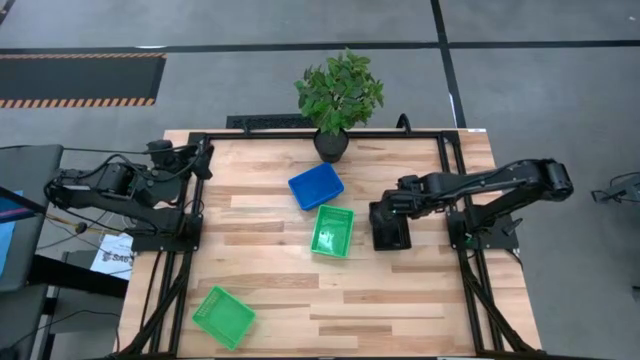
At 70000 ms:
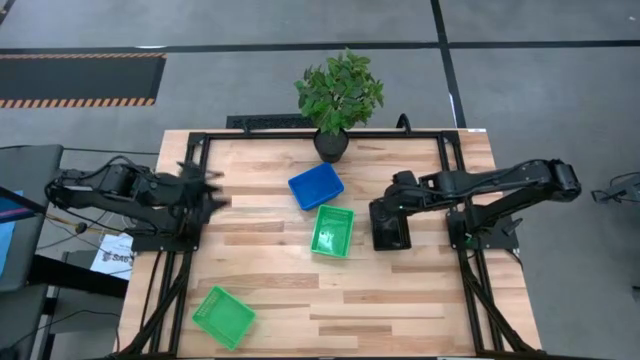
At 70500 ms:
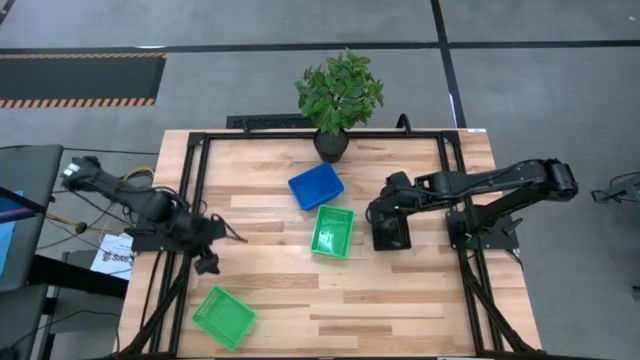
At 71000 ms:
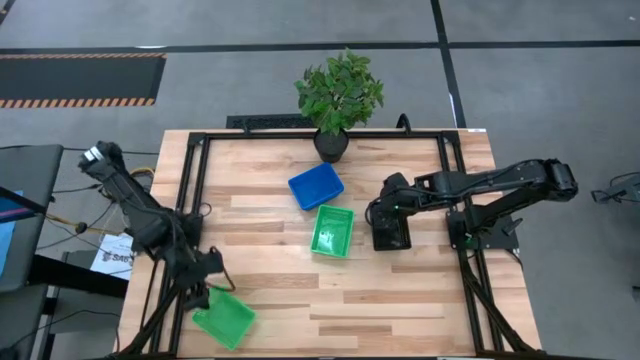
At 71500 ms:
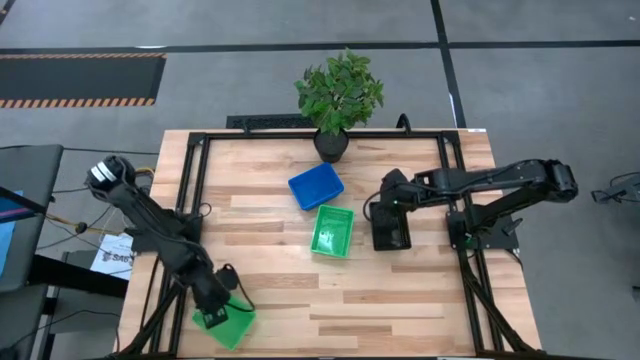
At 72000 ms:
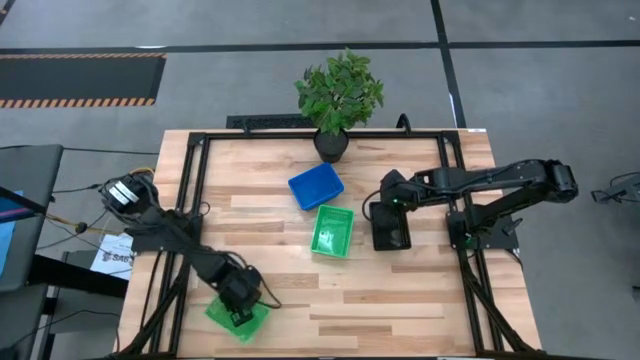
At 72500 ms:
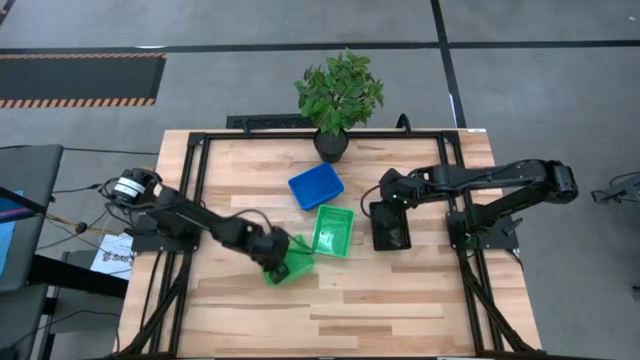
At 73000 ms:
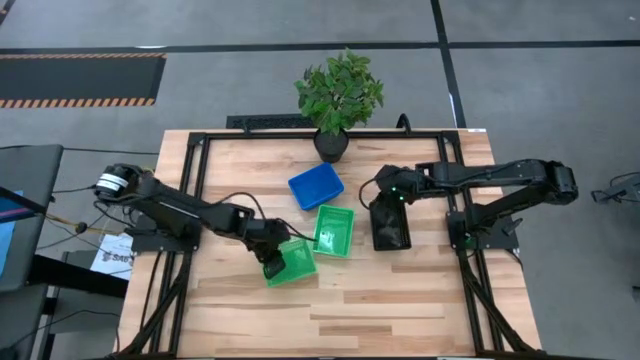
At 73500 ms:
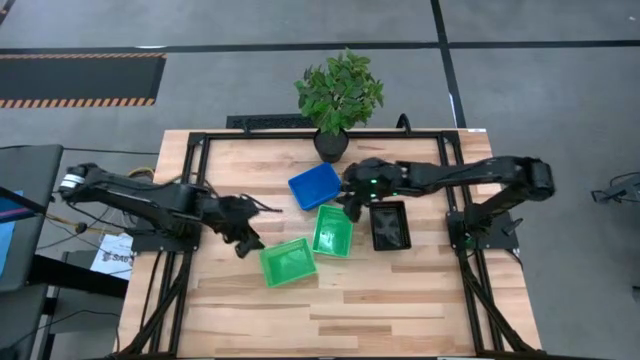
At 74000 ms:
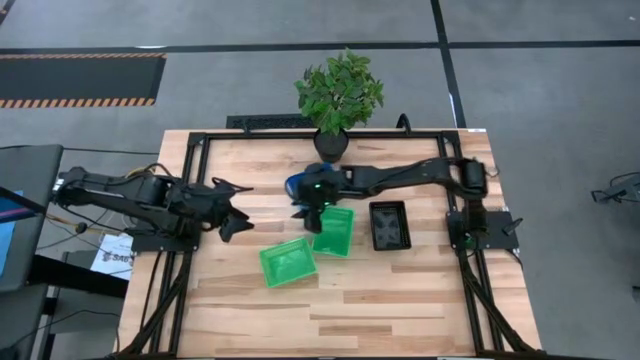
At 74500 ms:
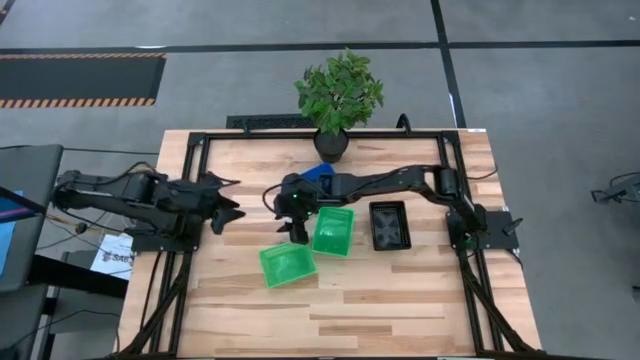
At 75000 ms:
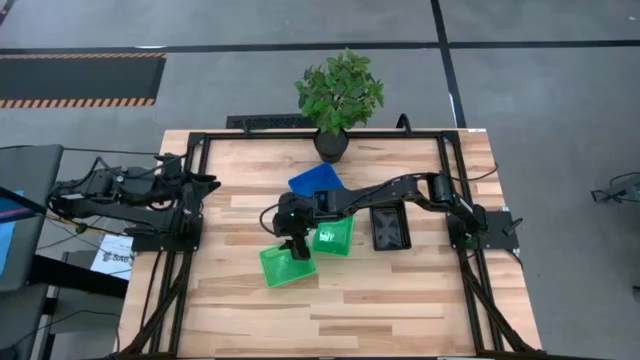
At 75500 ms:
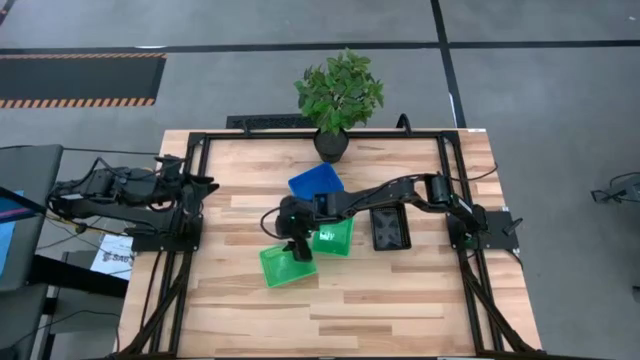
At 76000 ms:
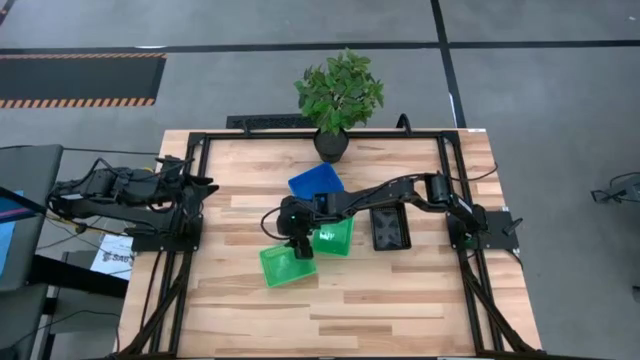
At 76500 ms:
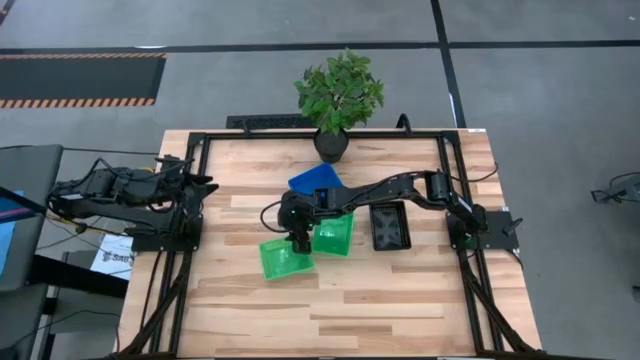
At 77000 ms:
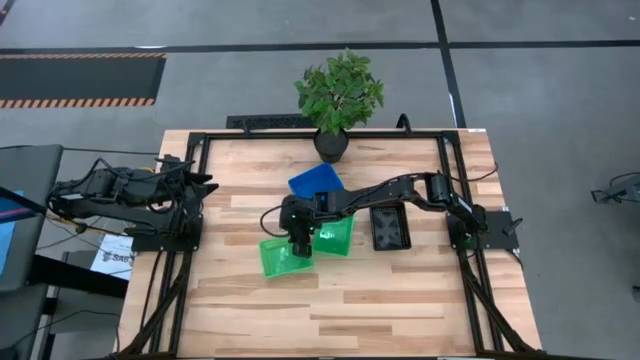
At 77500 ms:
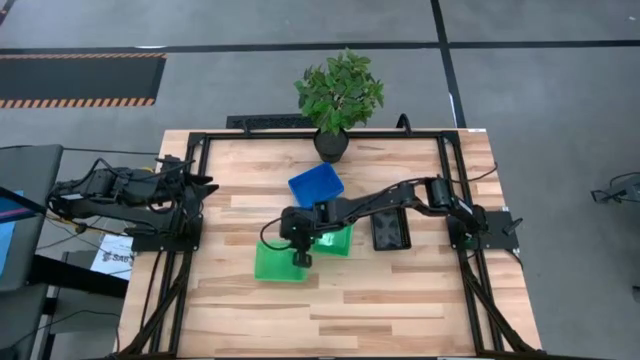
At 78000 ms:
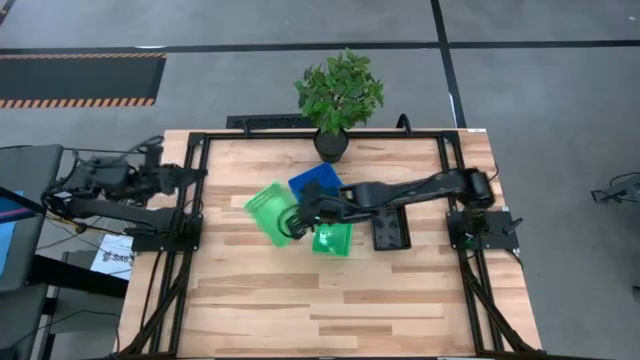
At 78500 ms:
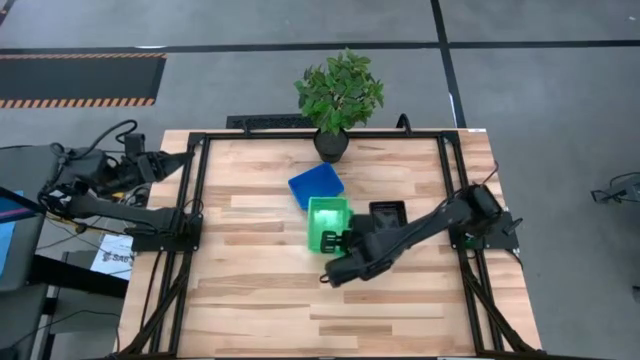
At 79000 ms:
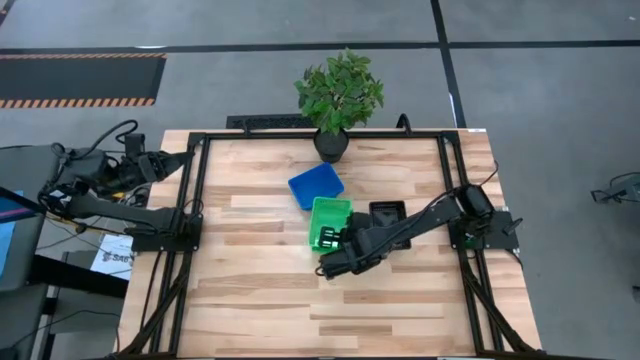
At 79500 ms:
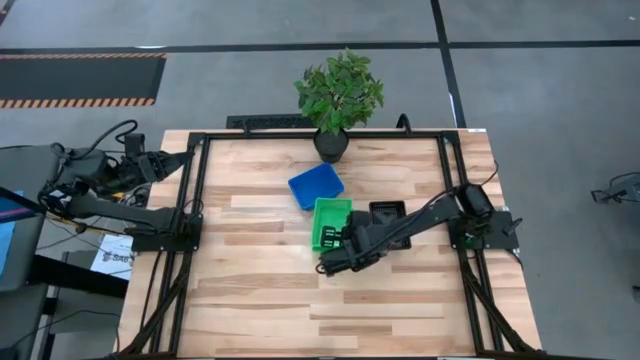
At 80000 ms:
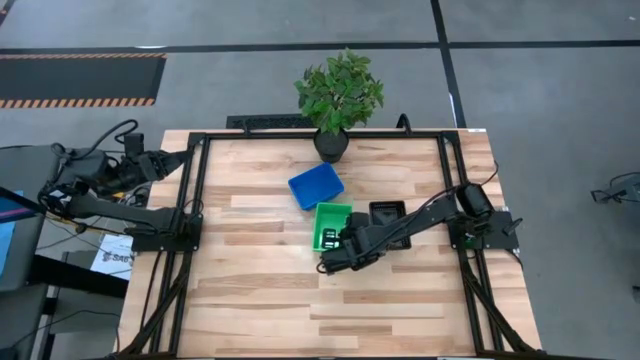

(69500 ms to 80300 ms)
Stack the bottom green bin on the top green bins

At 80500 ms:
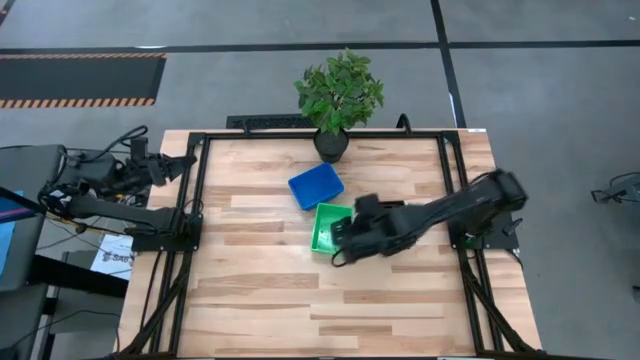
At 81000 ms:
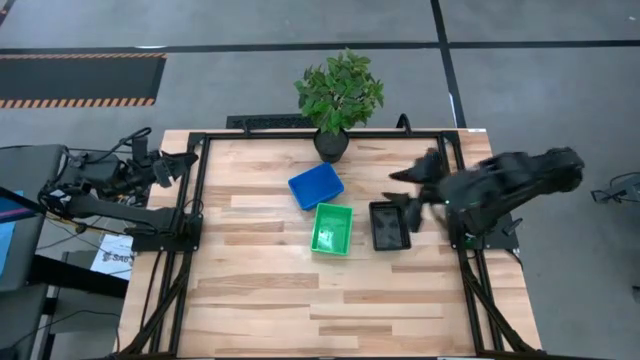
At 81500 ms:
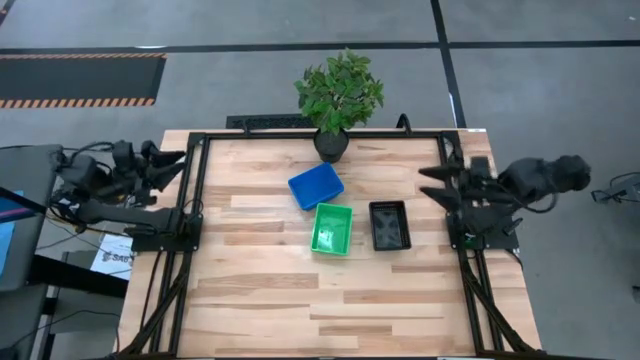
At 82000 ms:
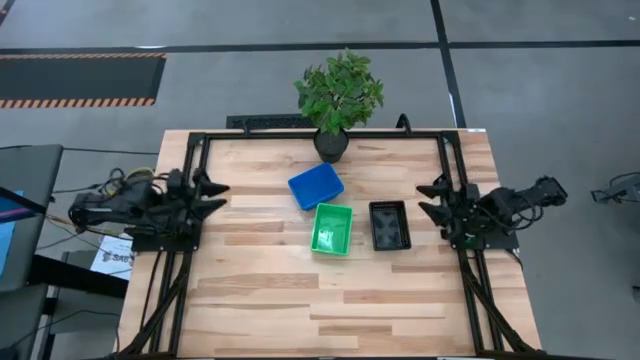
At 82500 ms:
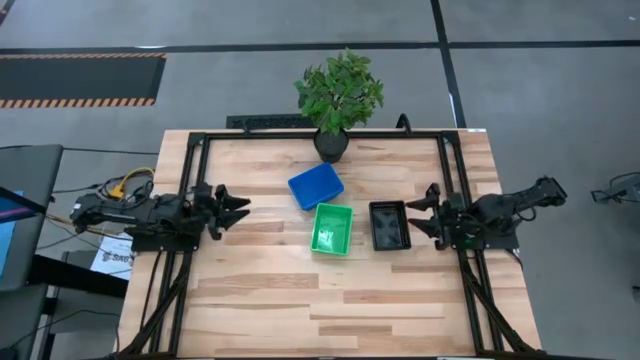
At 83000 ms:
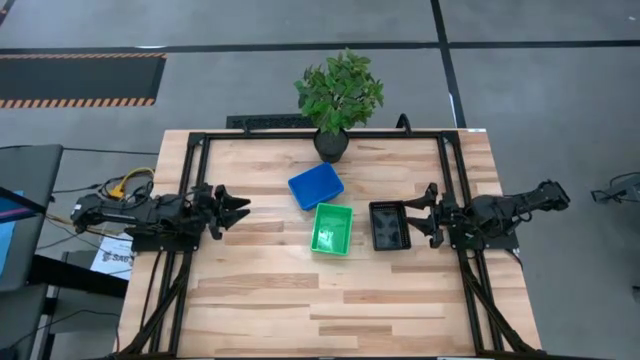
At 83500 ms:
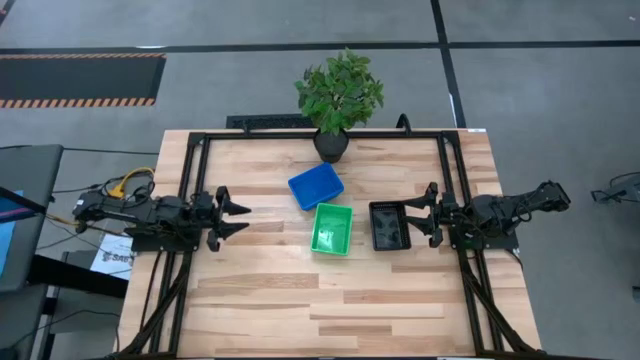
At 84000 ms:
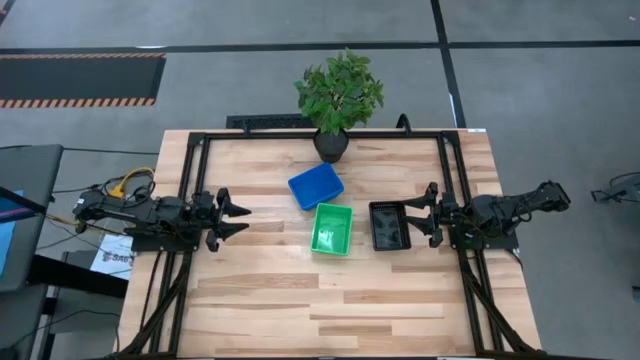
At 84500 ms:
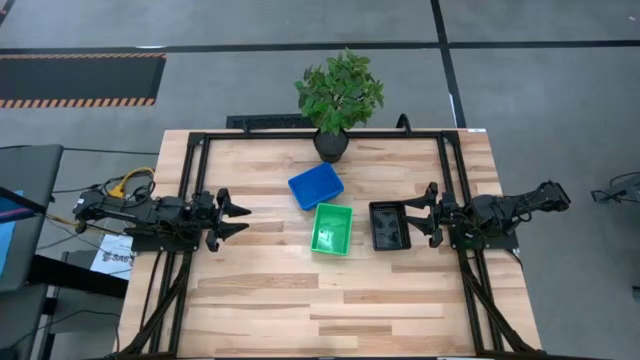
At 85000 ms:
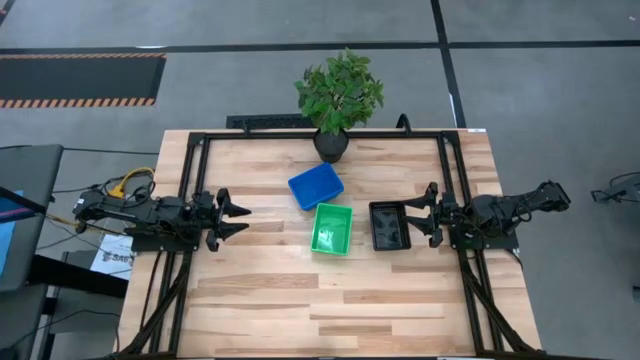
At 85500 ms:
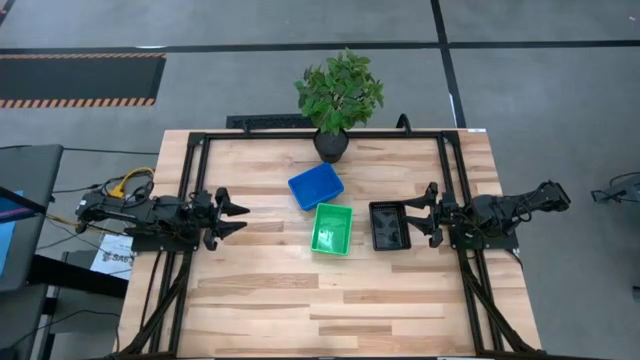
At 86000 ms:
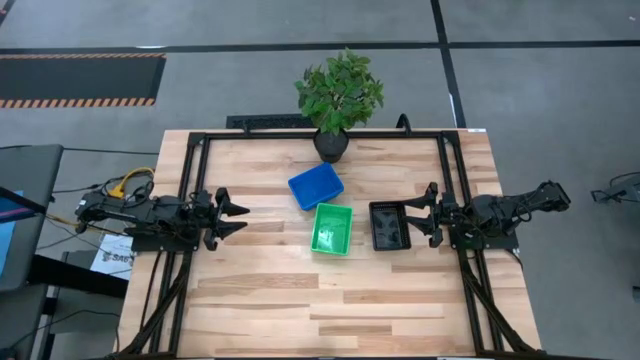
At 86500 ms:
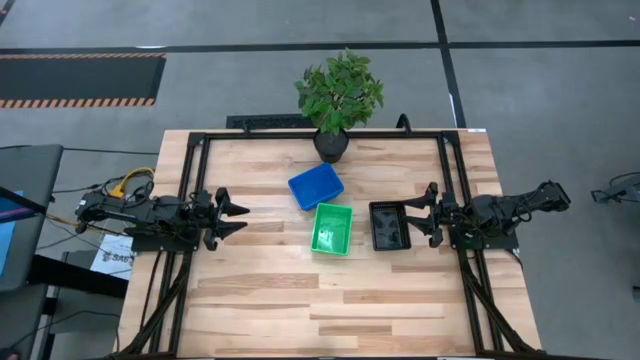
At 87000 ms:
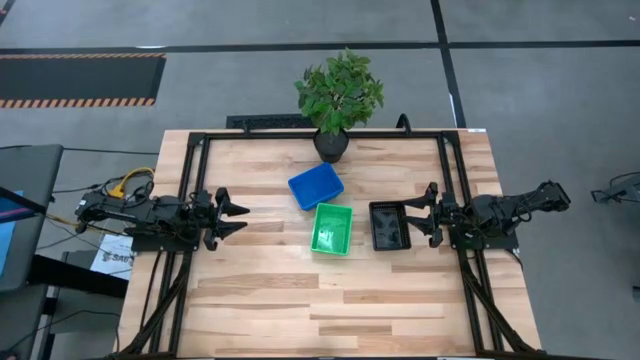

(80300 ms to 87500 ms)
Return to Home Position
